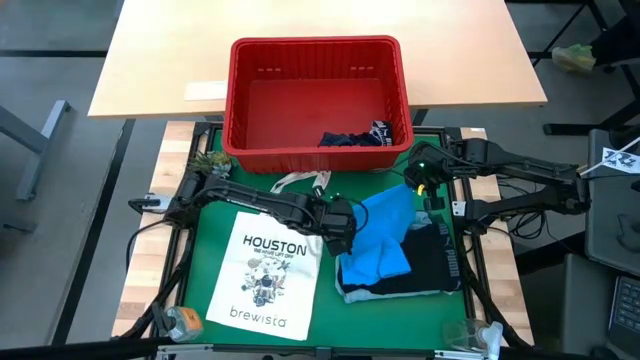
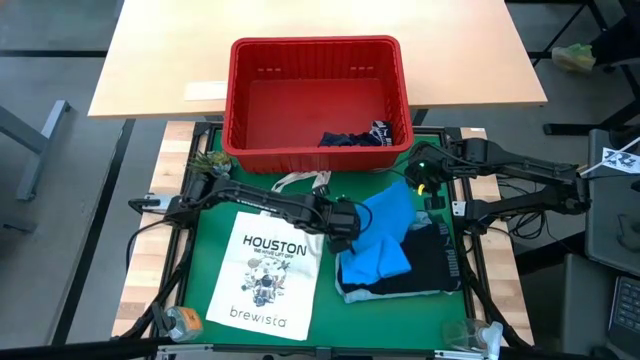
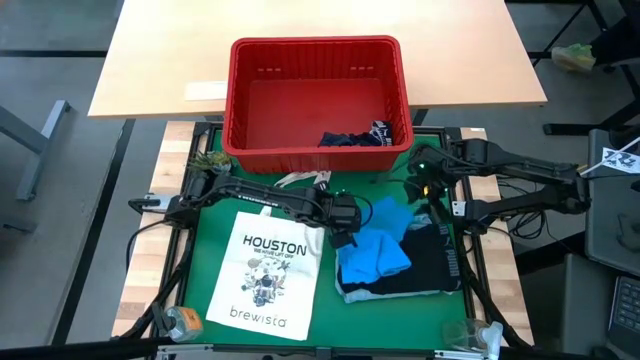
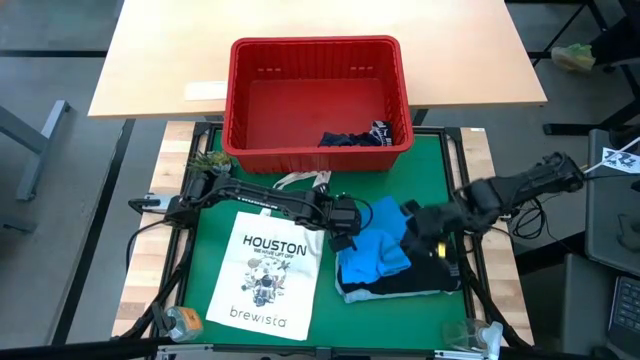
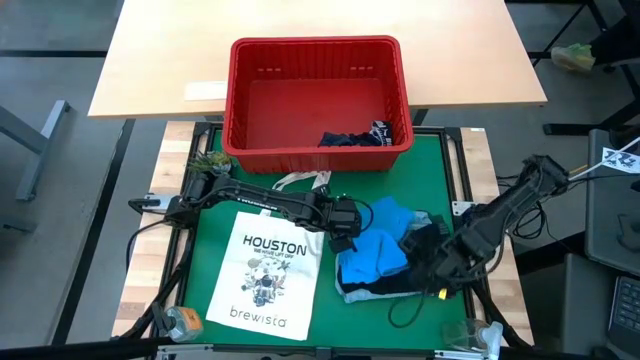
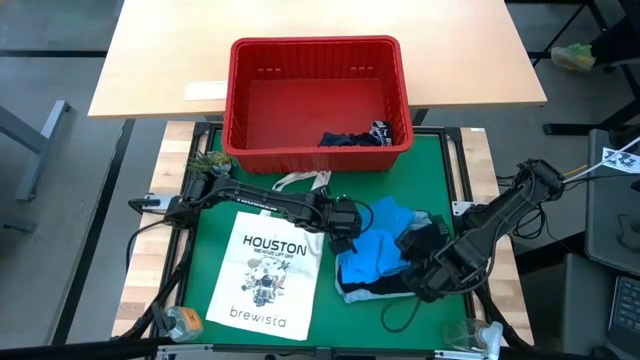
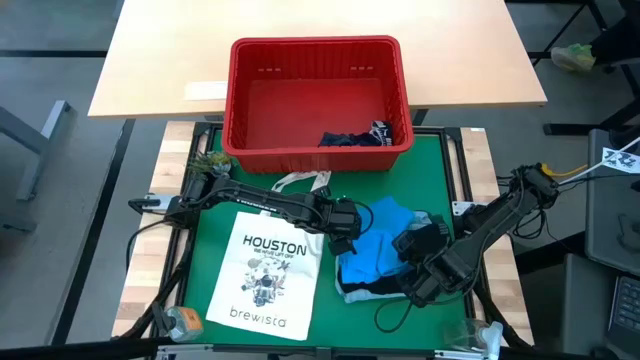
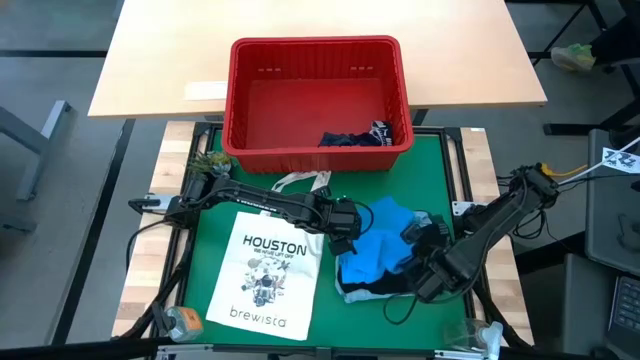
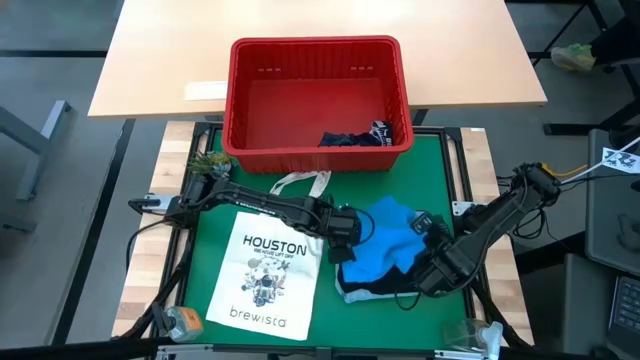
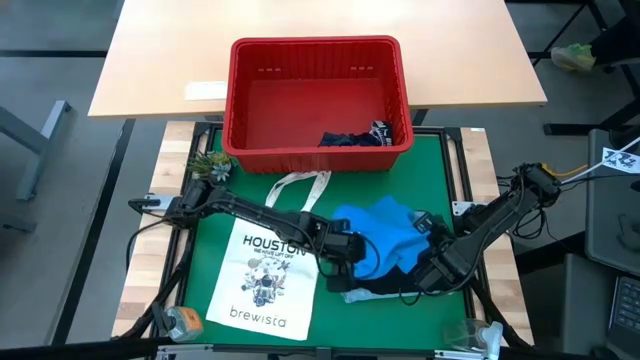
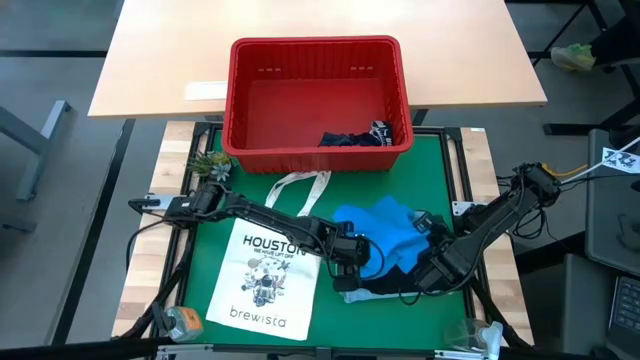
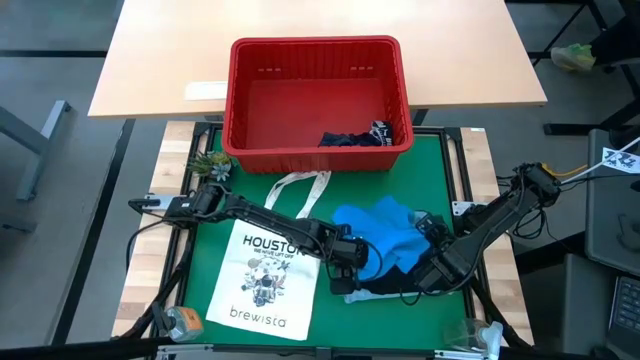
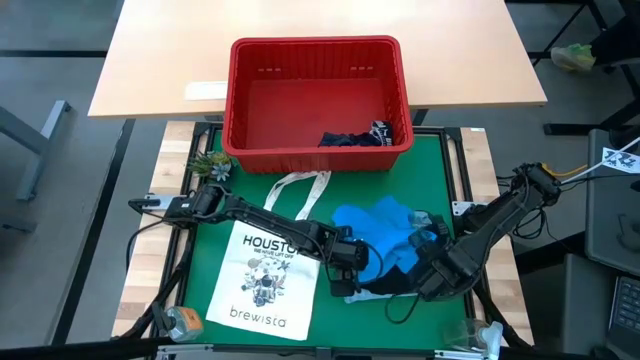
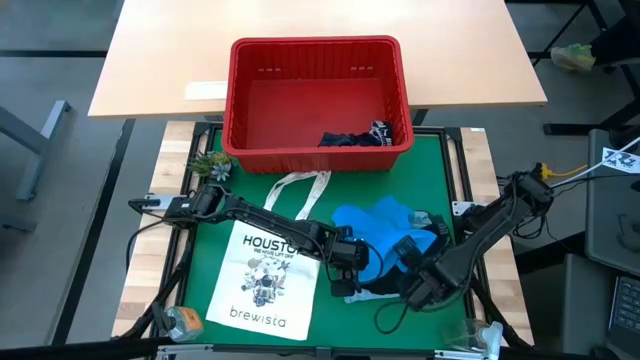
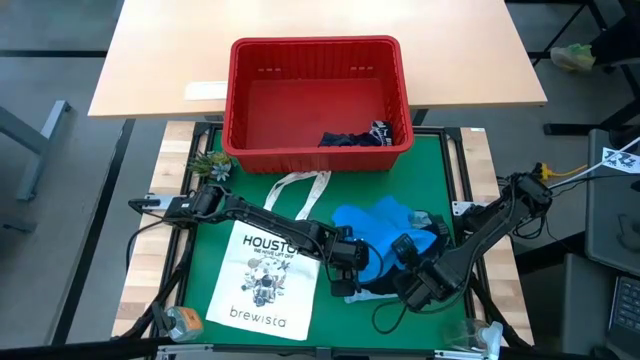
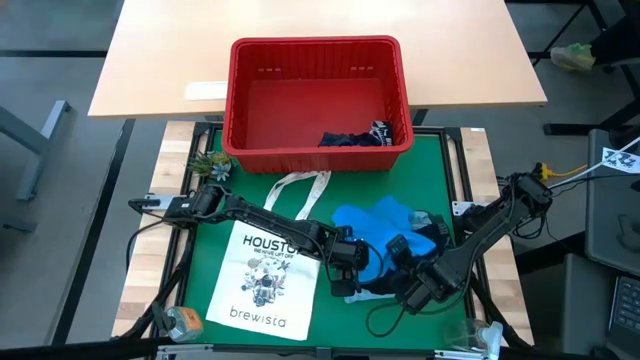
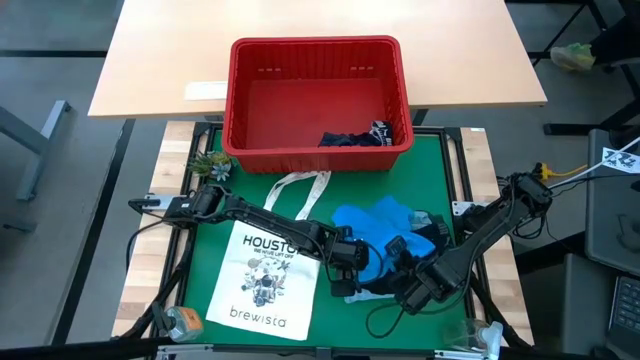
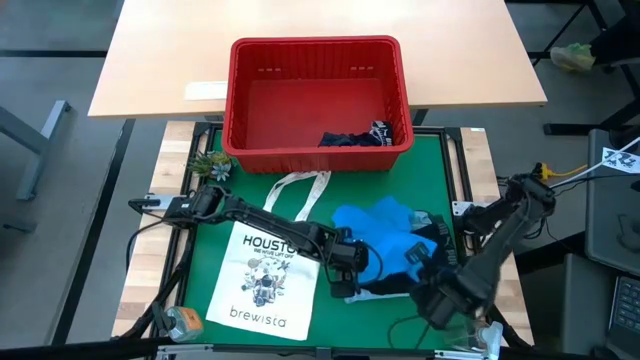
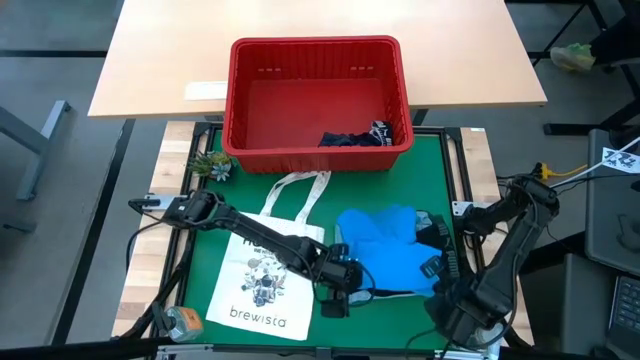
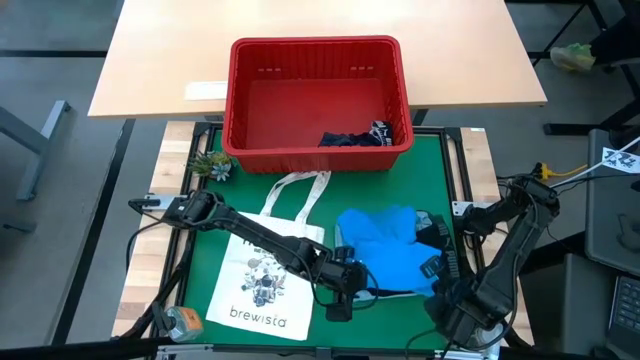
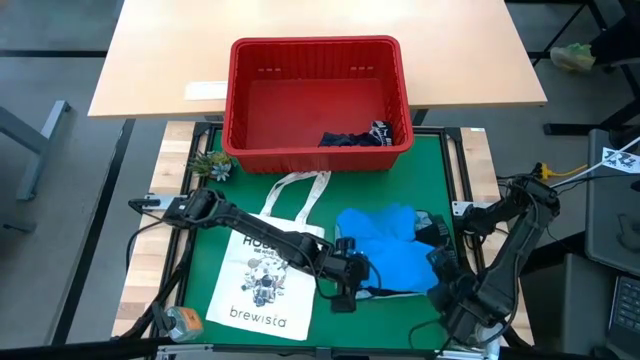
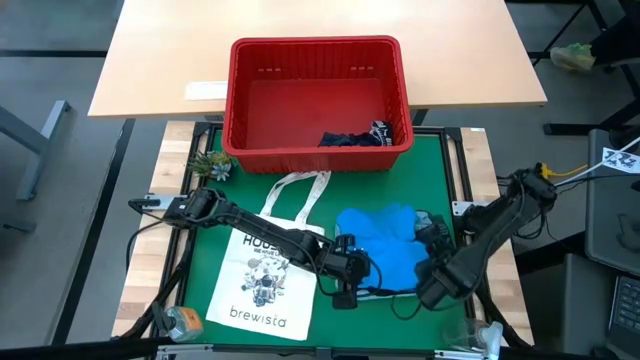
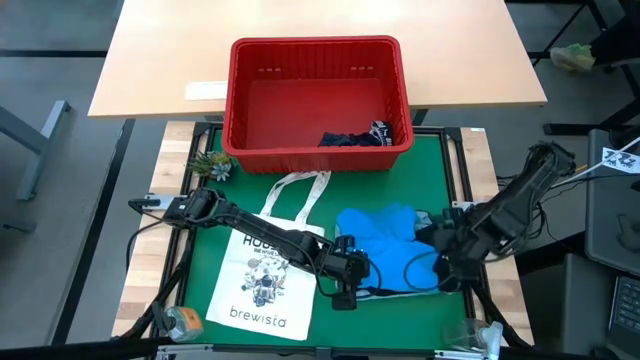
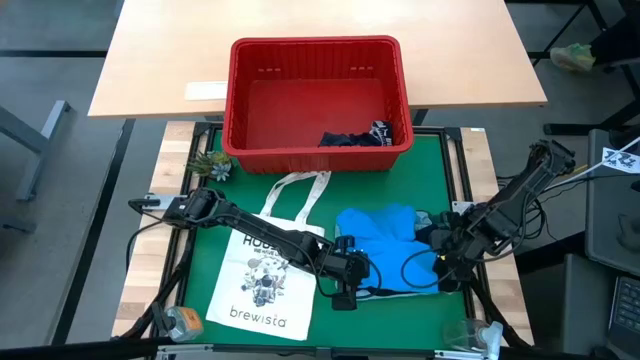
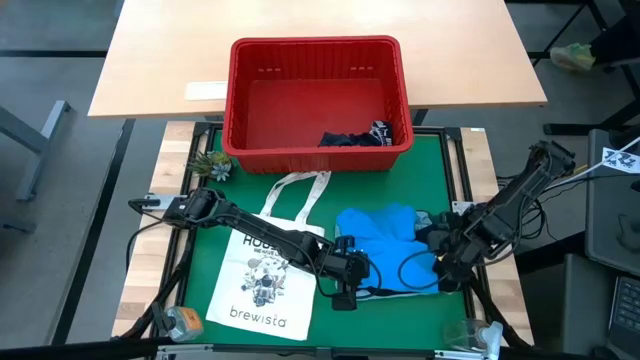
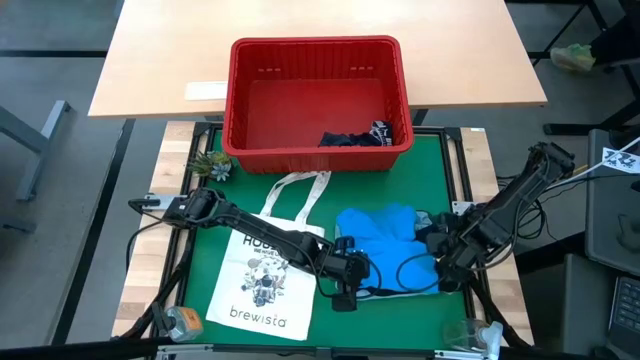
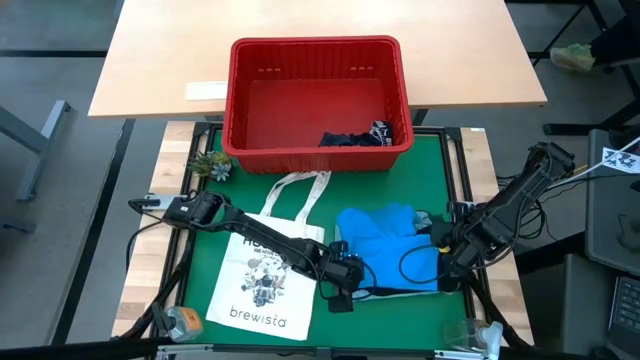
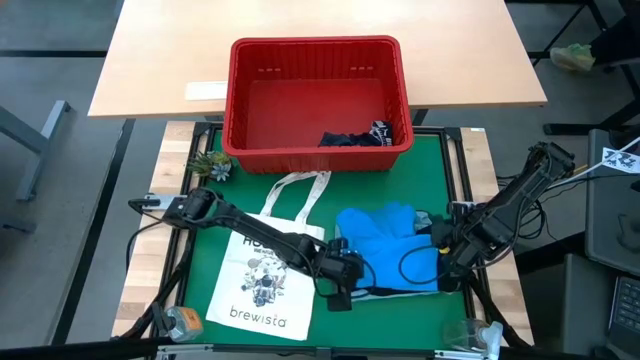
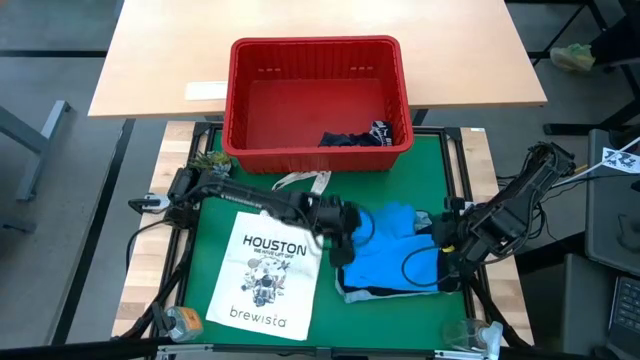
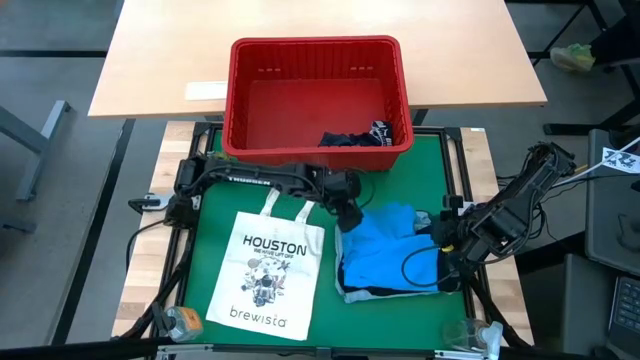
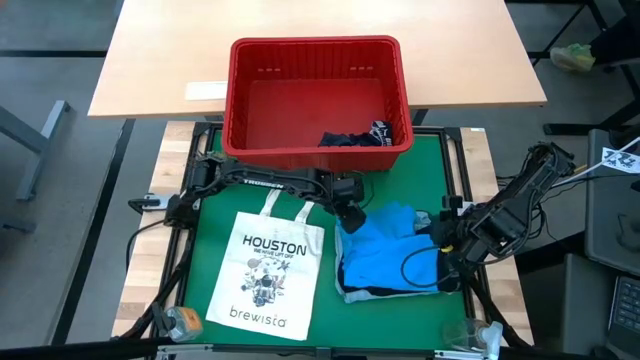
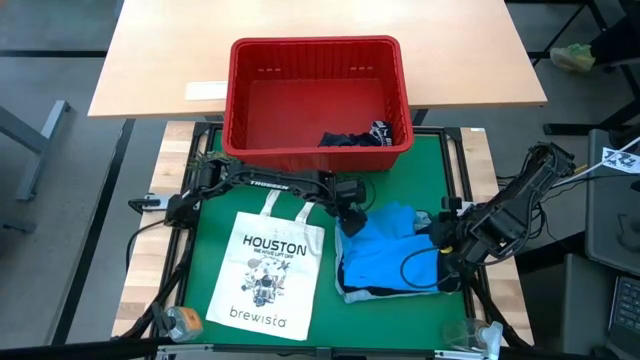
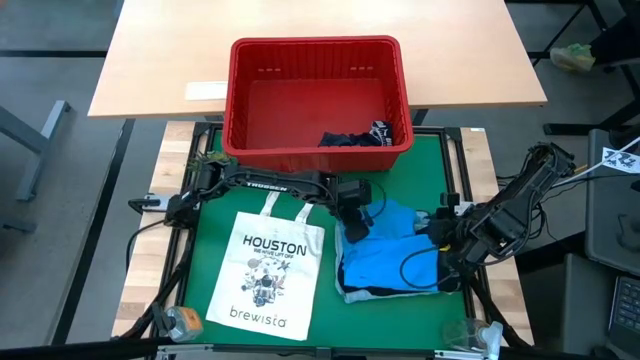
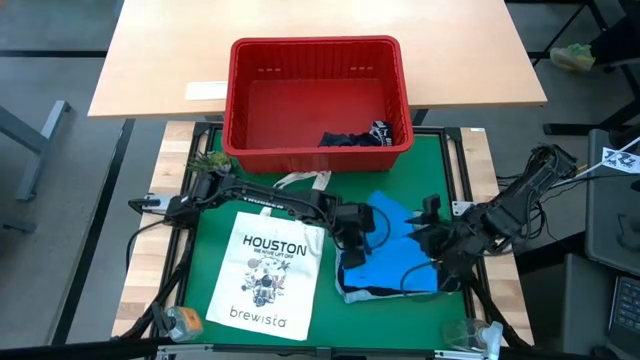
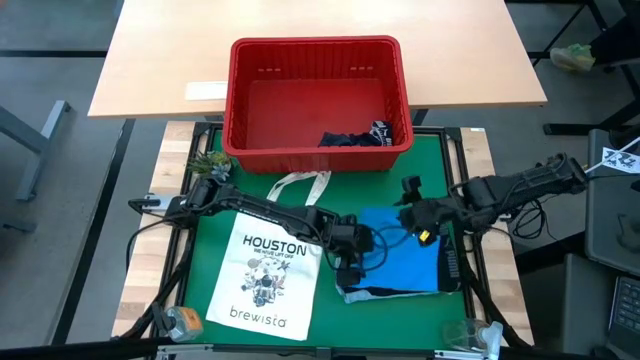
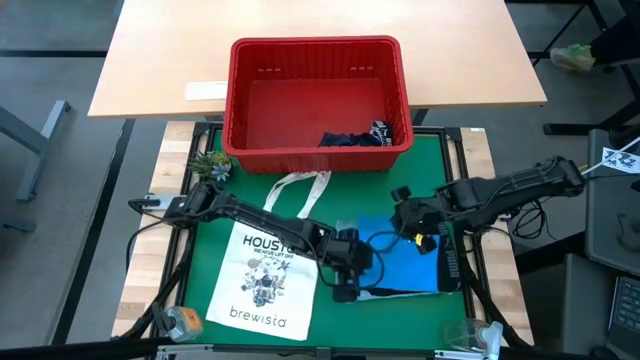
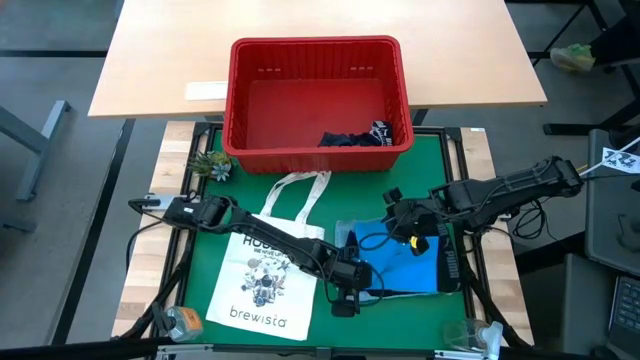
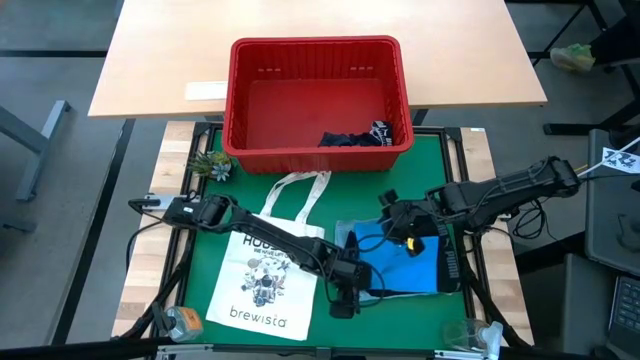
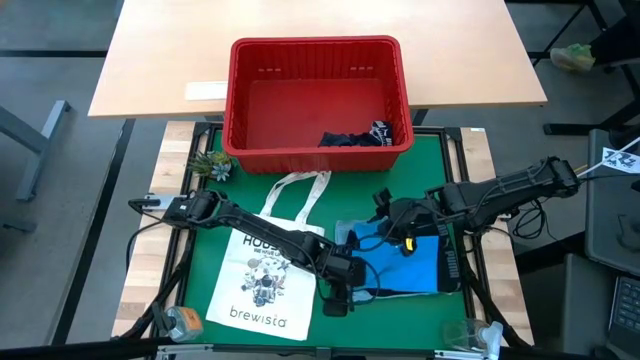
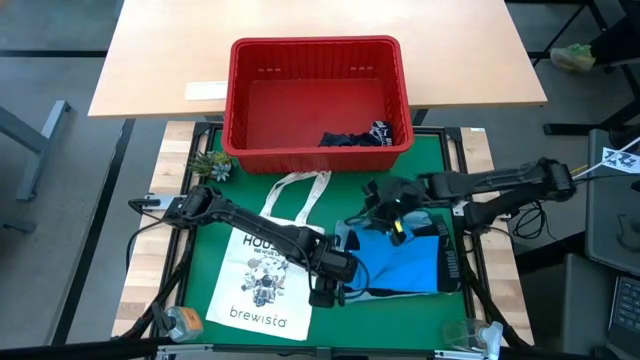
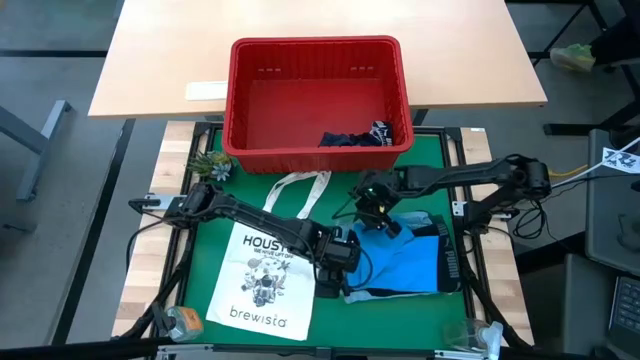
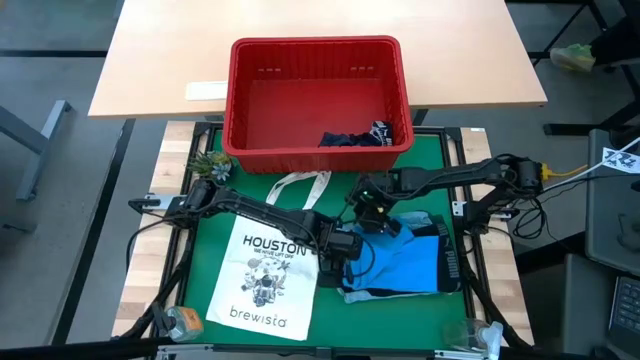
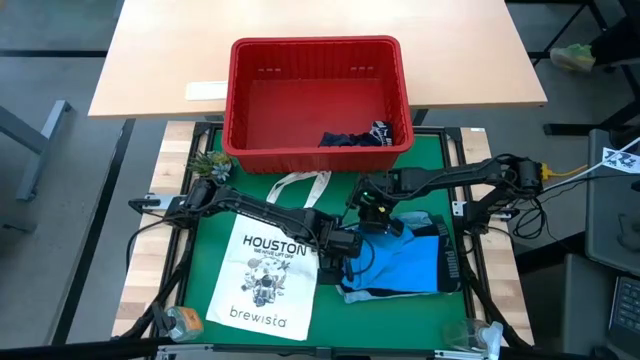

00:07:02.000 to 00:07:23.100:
Task: Fold Laundry from Bin
Fold the blue short
